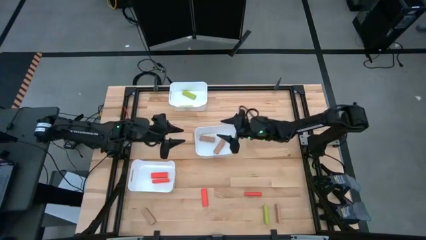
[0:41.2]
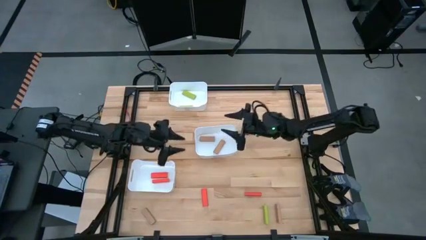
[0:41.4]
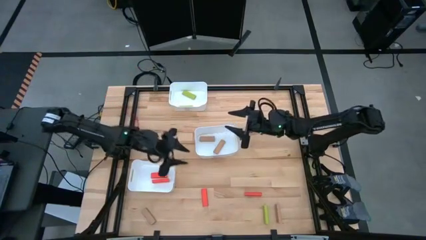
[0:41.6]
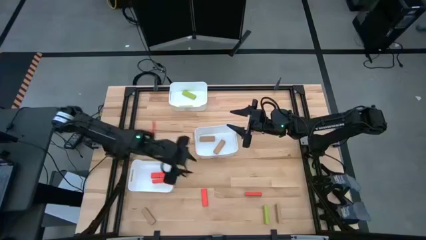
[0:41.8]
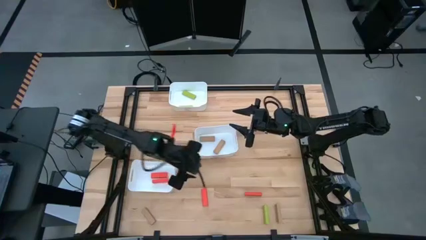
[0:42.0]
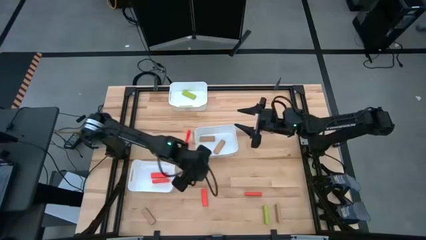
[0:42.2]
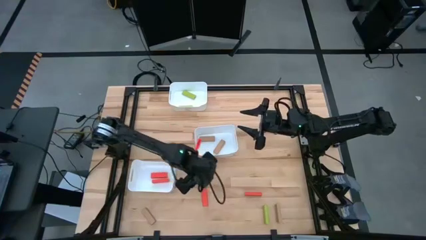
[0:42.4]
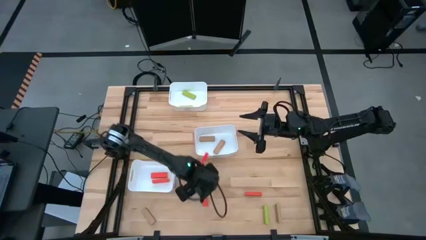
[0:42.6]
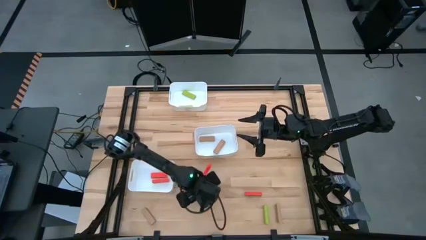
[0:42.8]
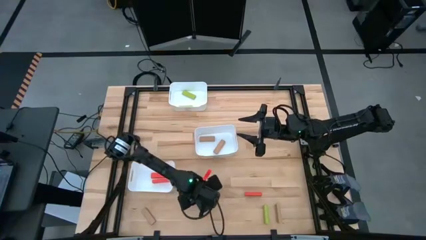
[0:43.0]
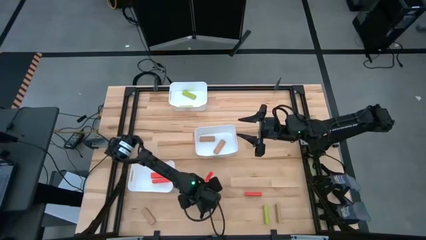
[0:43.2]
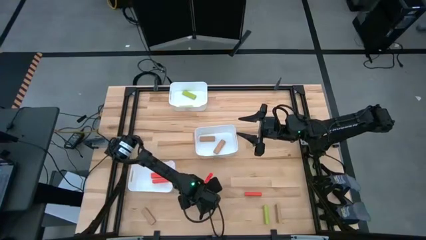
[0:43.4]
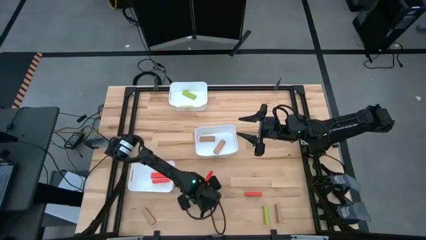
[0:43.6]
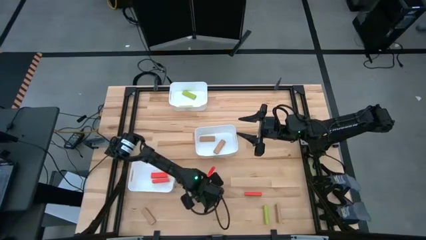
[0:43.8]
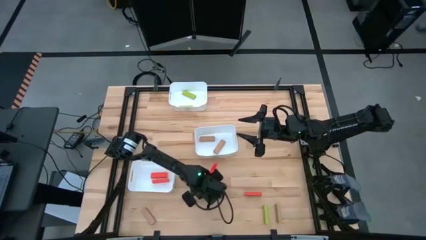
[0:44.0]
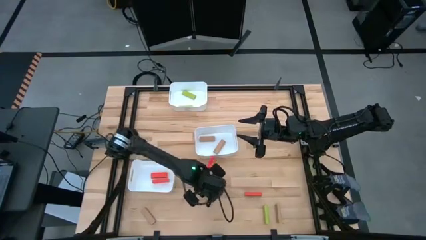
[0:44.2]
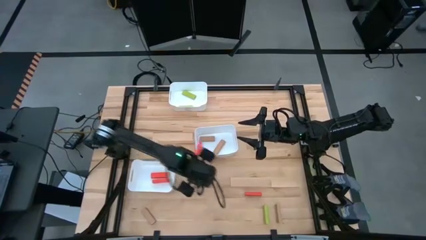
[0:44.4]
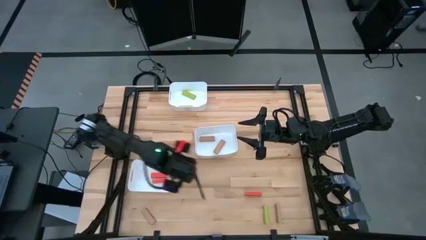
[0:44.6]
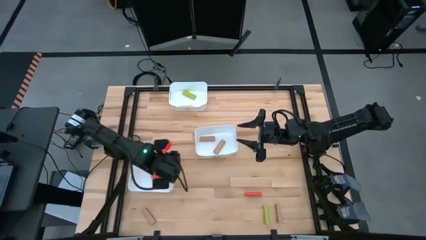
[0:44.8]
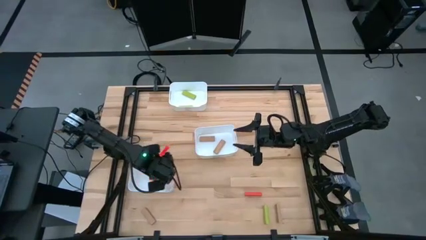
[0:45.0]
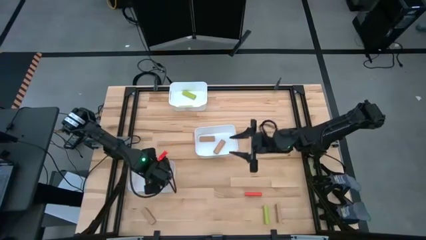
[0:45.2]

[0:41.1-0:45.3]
Task: Sort blocks
Put the orange block into the bottom white bin

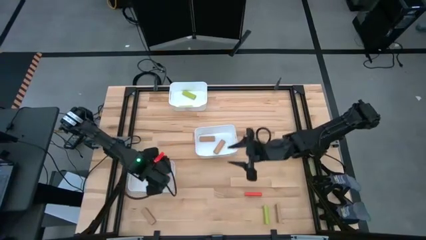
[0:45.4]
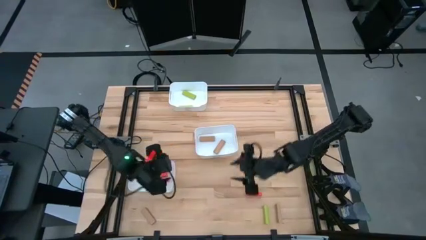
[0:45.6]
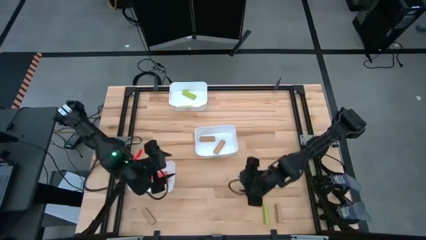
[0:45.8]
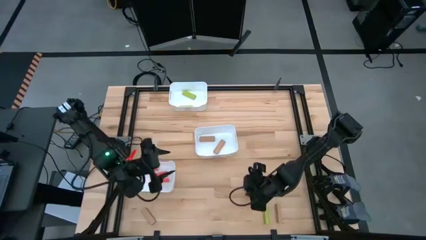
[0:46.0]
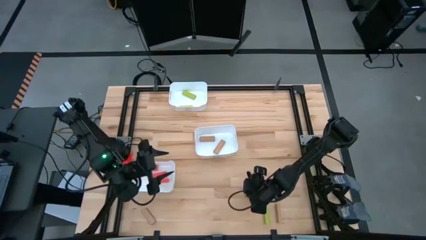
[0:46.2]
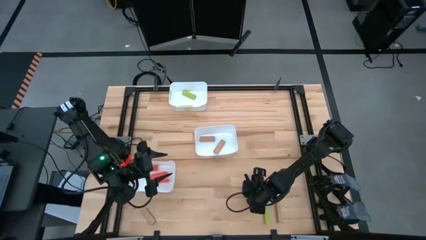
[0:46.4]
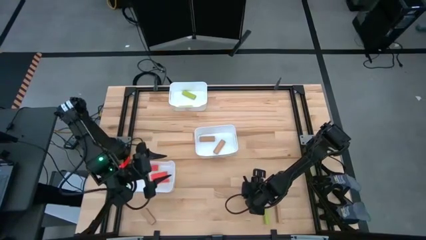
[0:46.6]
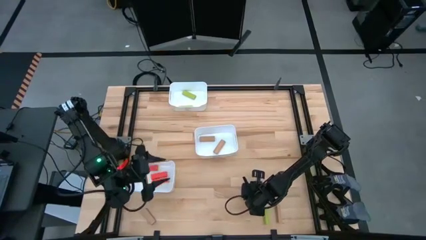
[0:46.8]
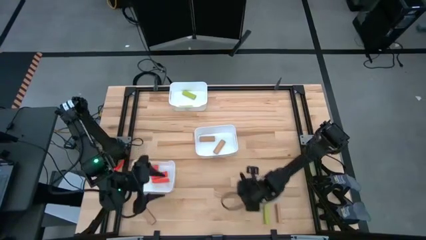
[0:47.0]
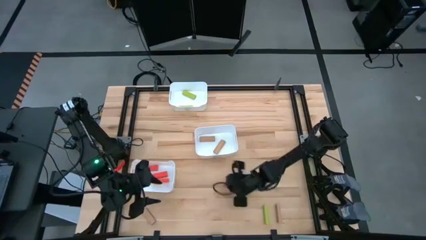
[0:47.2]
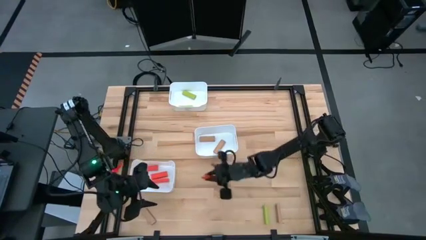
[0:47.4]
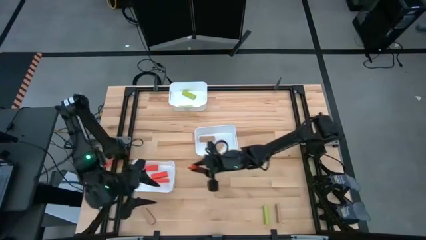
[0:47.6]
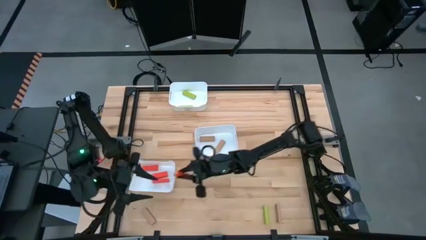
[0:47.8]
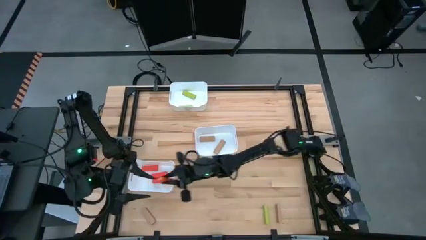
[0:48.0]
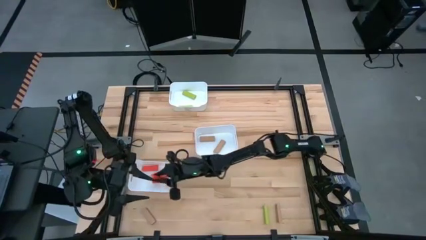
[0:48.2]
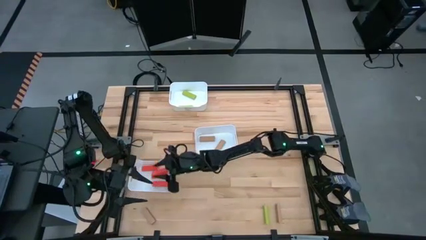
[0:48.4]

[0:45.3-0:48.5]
Put the orange block into the bottom white bin

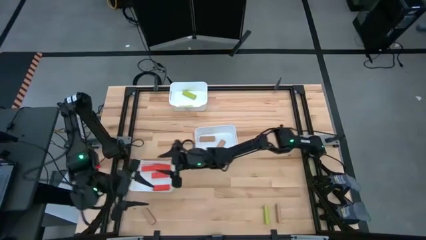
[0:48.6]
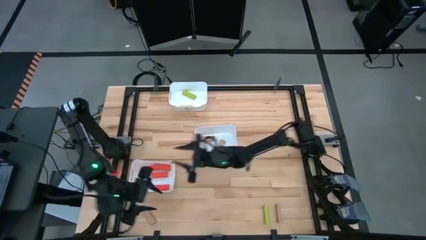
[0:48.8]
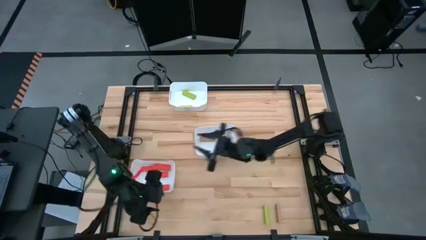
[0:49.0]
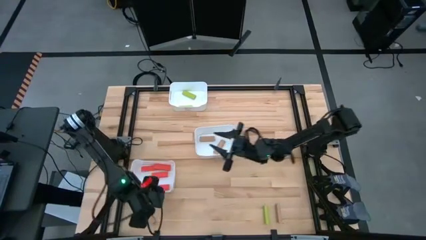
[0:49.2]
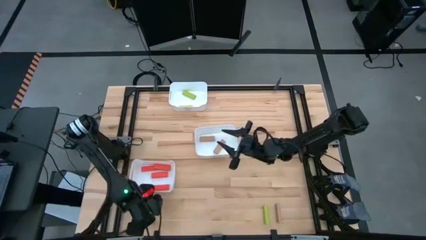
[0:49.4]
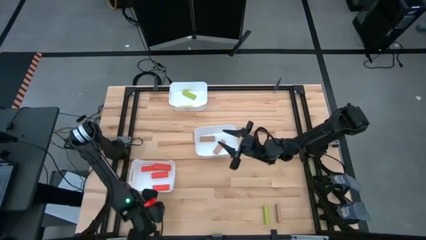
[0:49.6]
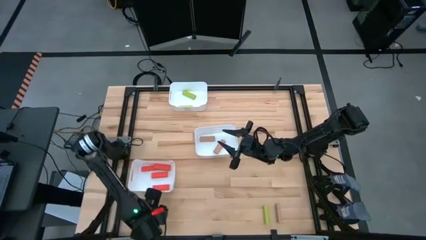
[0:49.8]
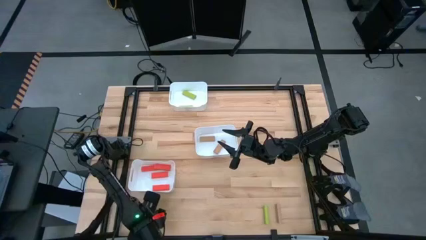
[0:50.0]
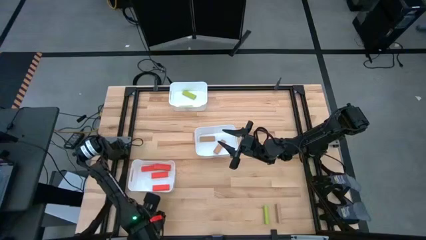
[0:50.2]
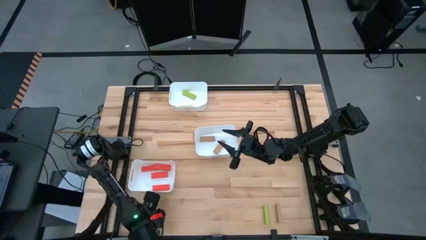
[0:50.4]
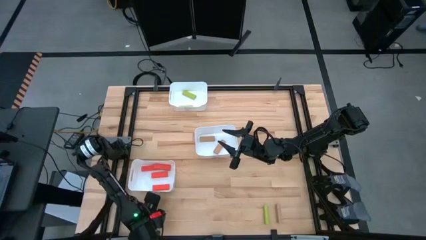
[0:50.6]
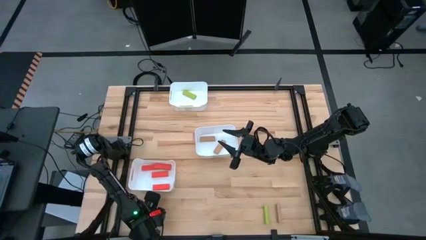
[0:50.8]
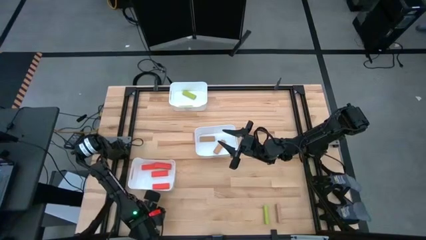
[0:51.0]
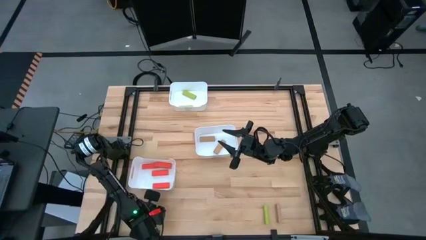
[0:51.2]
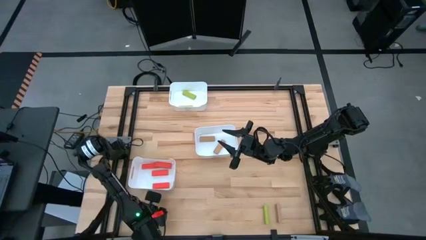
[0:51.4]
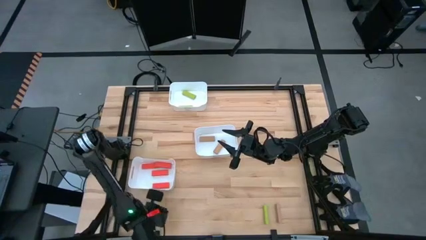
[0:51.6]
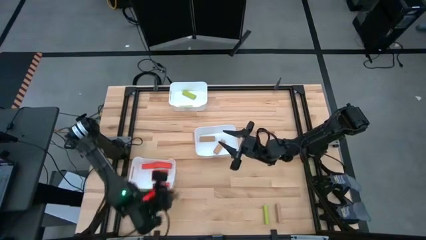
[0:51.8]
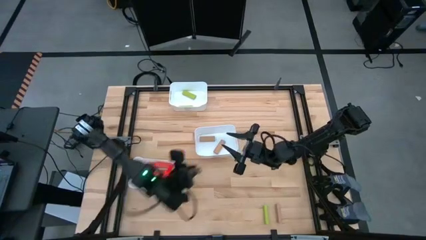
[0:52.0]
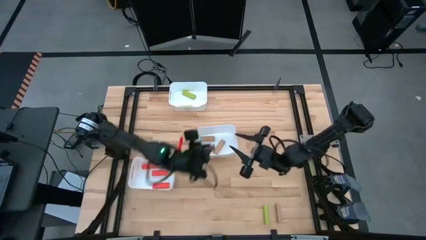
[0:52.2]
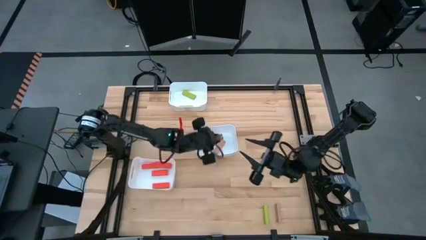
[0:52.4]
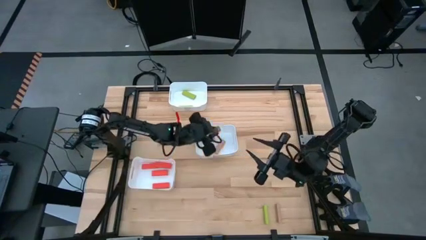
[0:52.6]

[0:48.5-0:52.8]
Put the brown block into the middle white bin

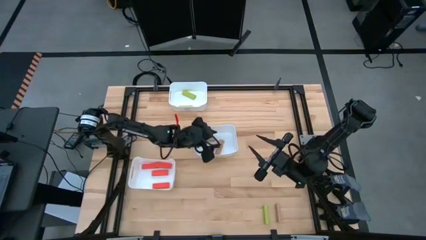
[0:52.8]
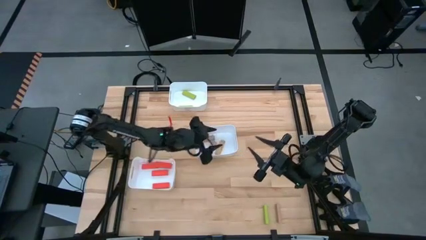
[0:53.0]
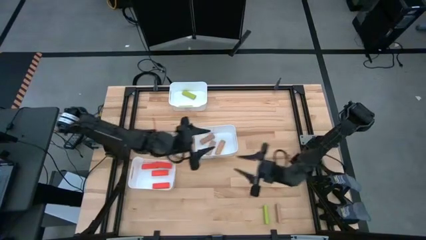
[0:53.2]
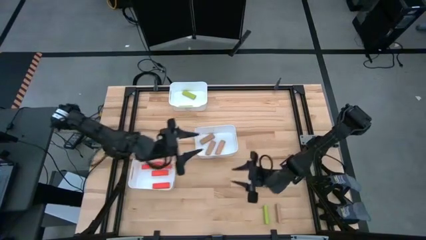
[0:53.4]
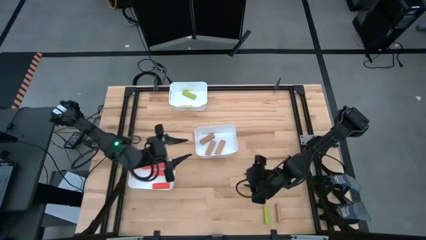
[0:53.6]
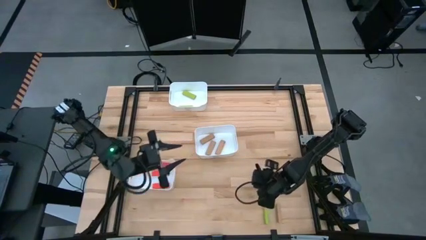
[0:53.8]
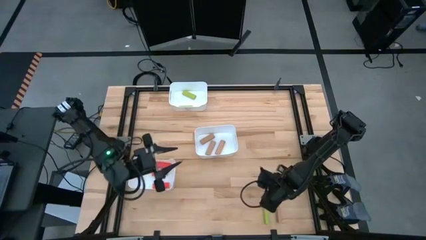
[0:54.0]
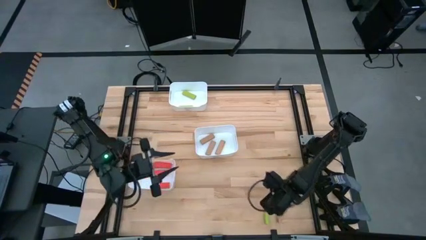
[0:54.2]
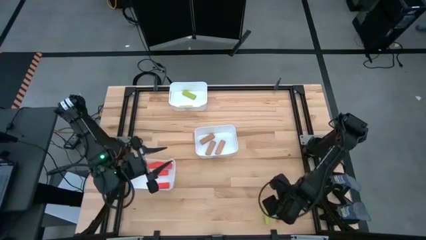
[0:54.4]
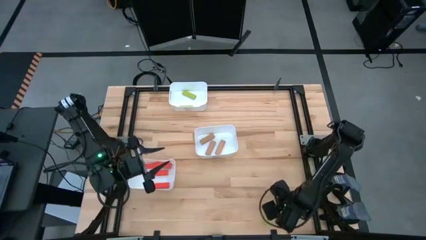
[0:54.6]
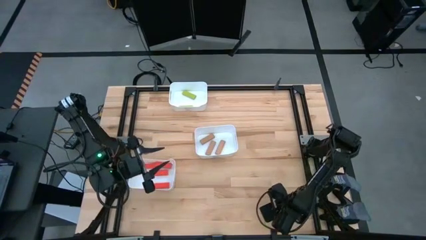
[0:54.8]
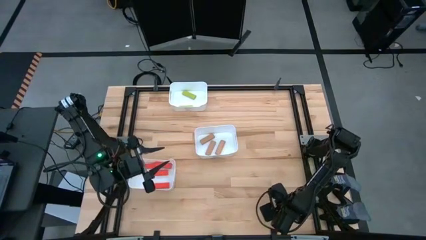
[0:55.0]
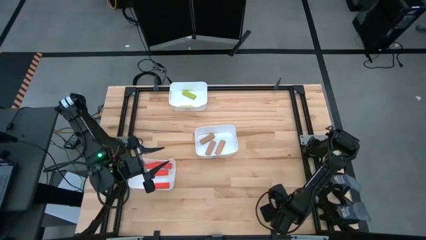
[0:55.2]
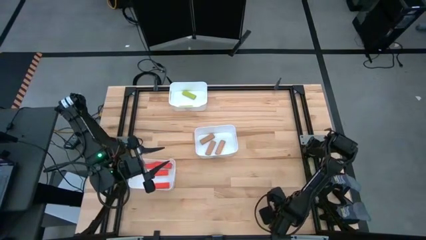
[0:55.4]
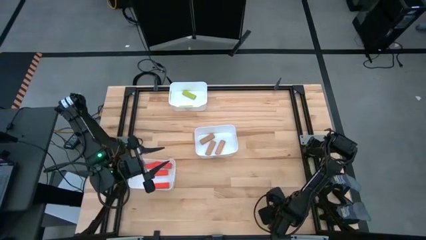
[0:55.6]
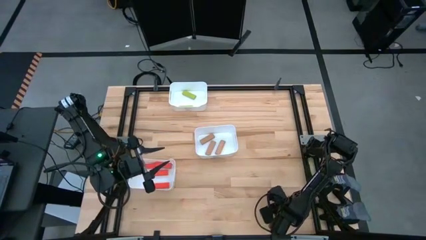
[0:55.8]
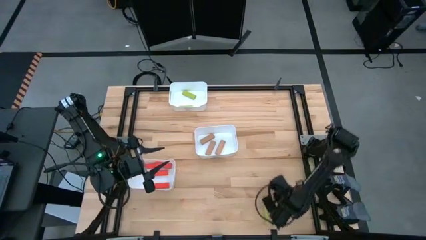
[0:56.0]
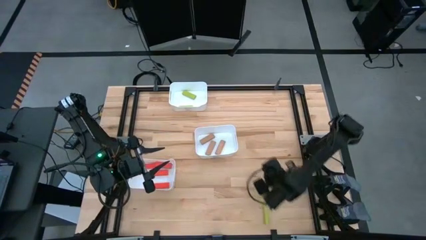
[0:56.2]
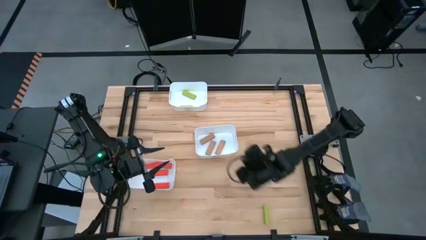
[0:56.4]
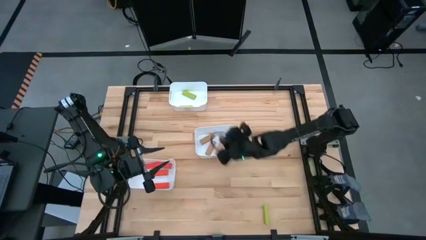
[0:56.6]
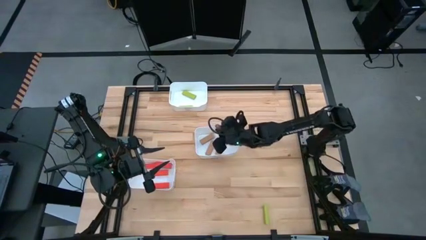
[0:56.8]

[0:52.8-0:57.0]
Put the brown block into the middle white bin

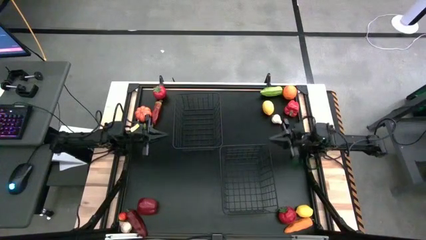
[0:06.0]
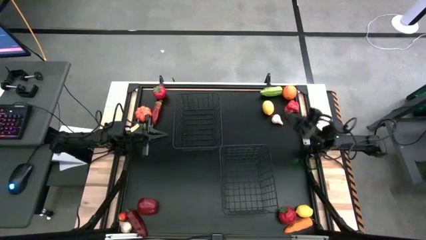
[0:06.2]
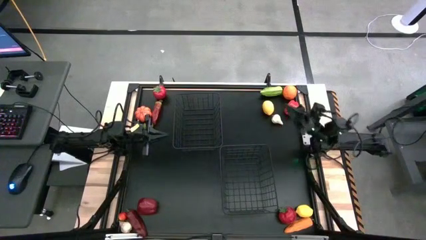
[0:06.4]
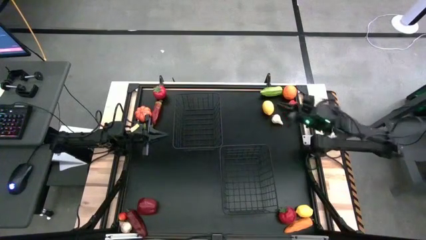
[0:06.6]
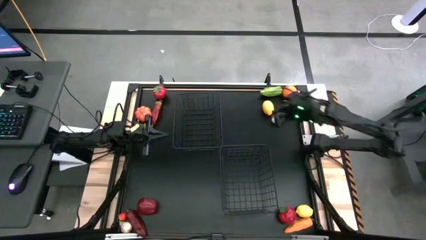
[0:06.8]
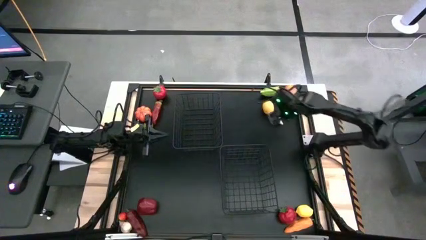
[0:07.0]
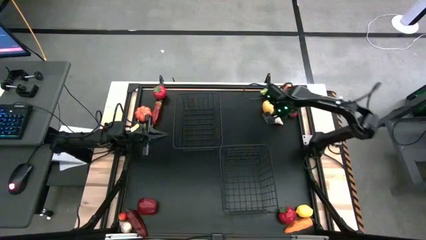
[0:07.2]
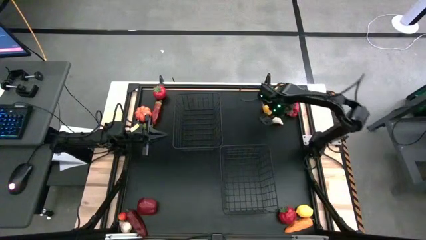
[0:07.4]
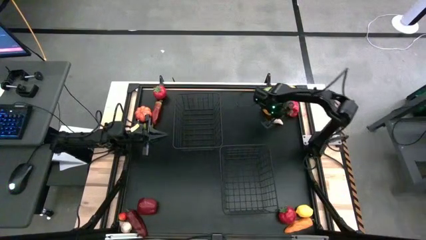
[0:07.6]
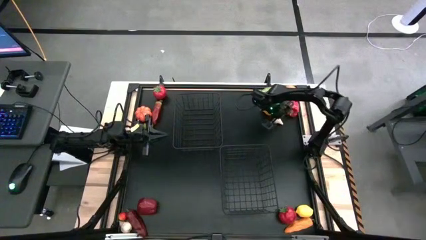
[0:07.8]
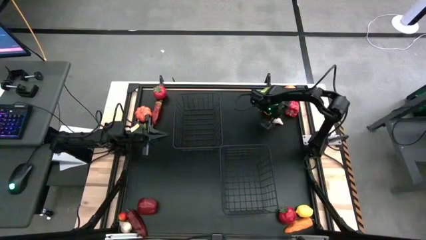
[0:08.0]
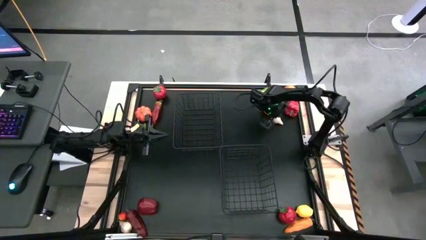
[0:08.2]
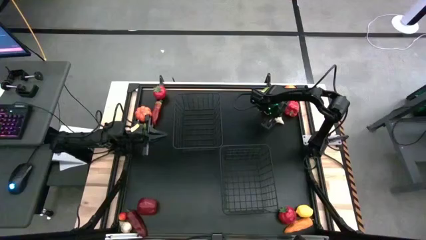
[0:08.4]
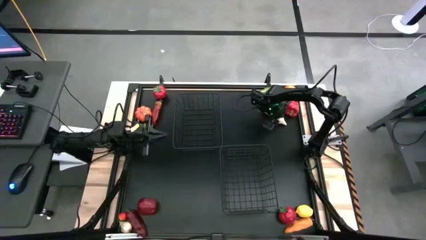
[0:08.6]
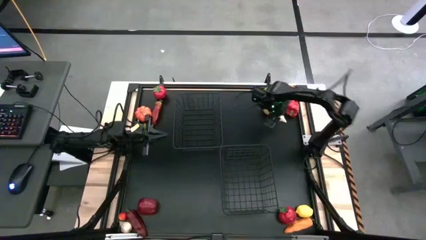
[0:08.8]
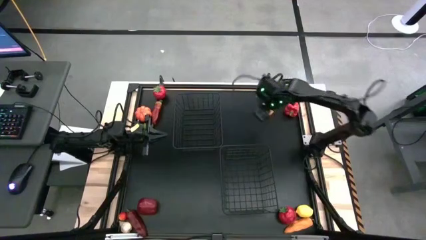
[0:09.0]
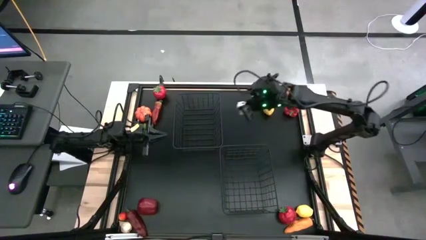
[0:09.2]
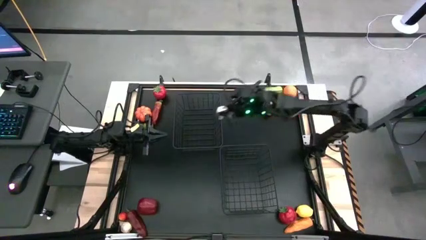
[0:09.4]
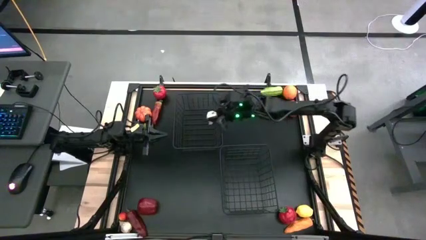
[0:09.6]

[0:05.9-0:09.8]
Task: Sort produce into baskets
Put the top white garlic into the top black wire basket
